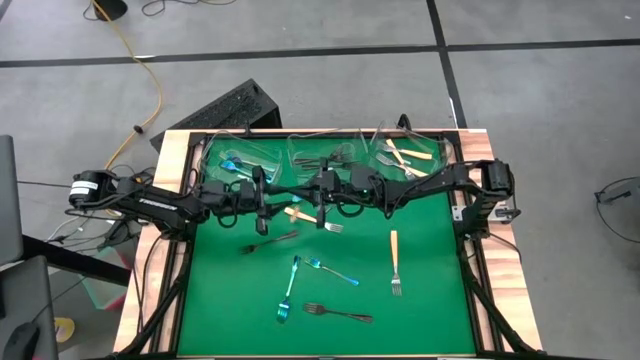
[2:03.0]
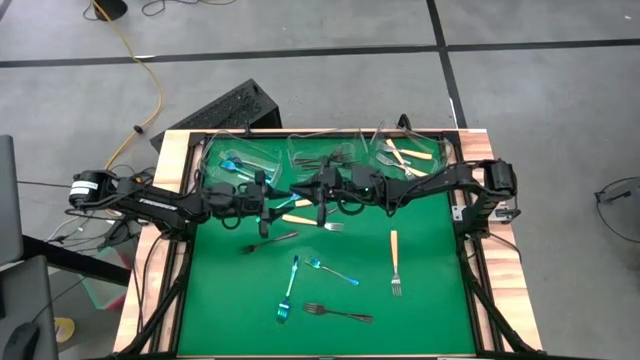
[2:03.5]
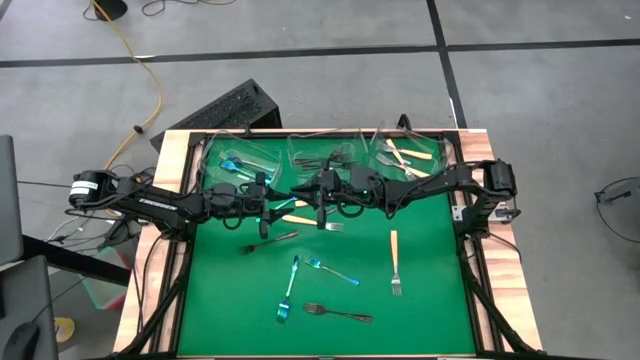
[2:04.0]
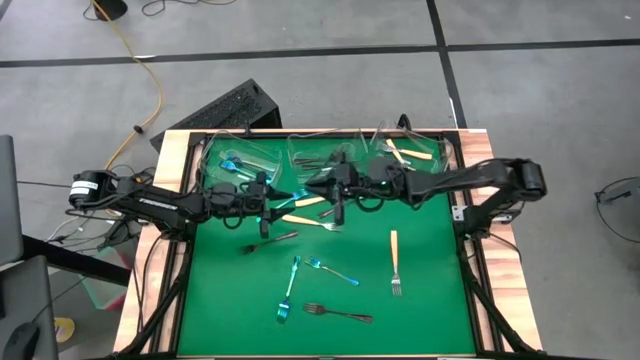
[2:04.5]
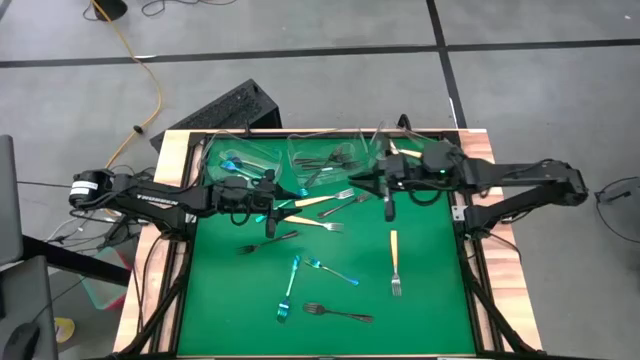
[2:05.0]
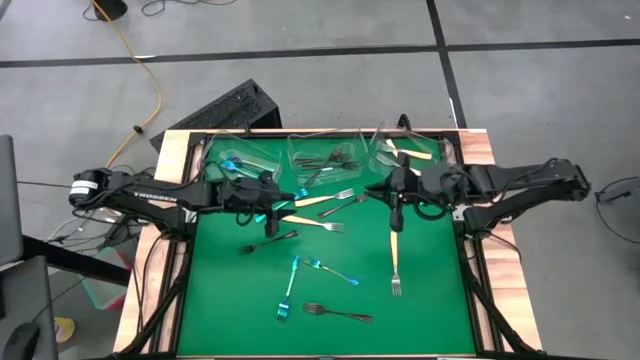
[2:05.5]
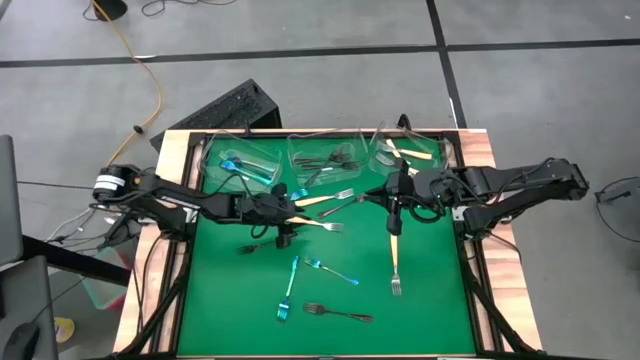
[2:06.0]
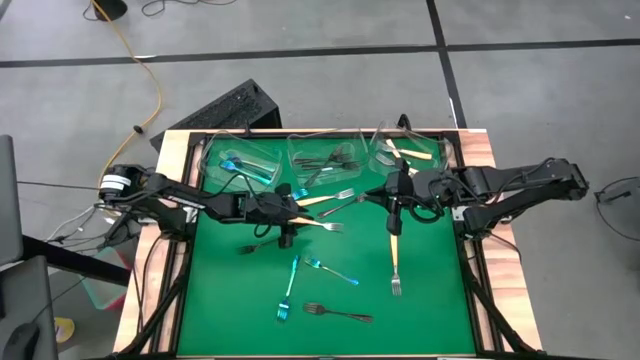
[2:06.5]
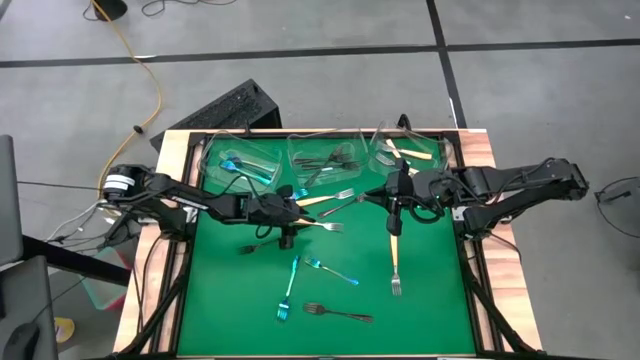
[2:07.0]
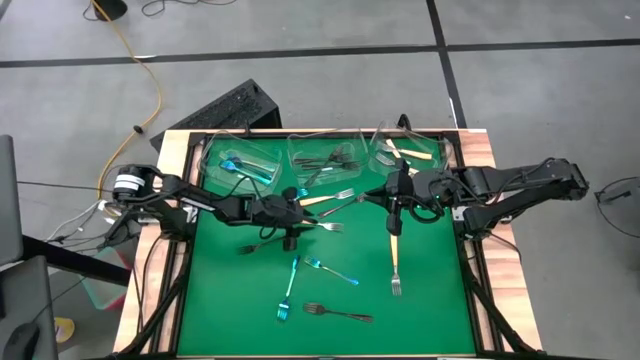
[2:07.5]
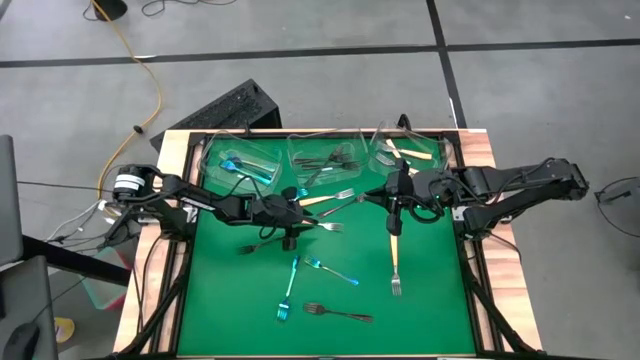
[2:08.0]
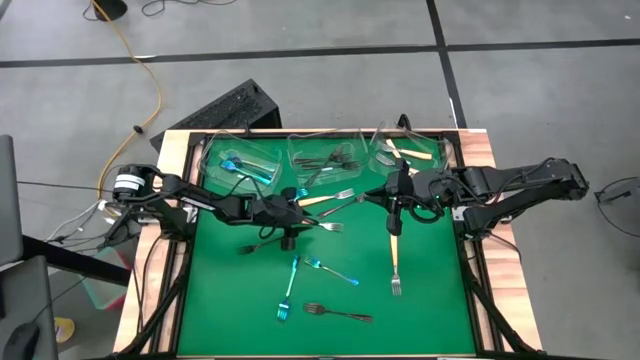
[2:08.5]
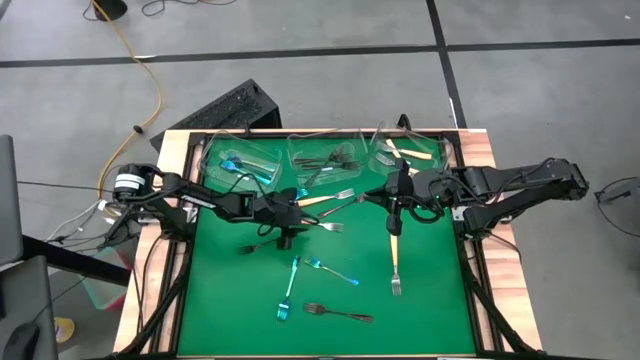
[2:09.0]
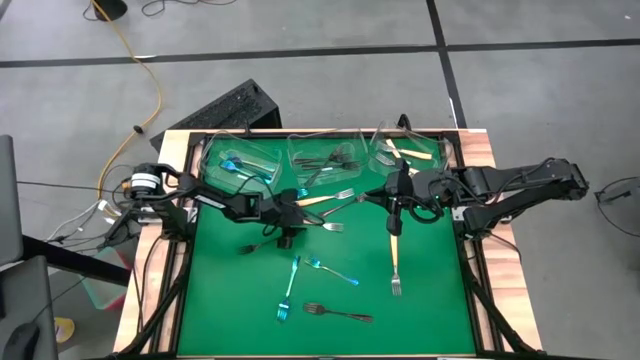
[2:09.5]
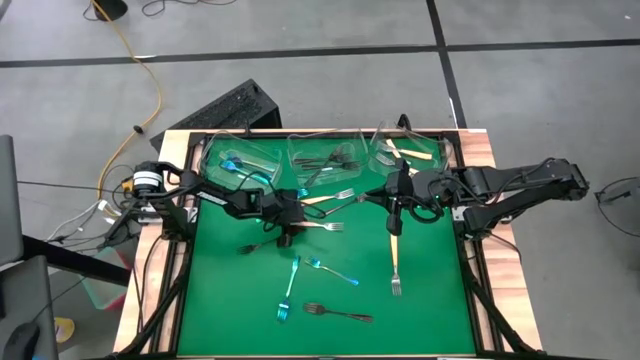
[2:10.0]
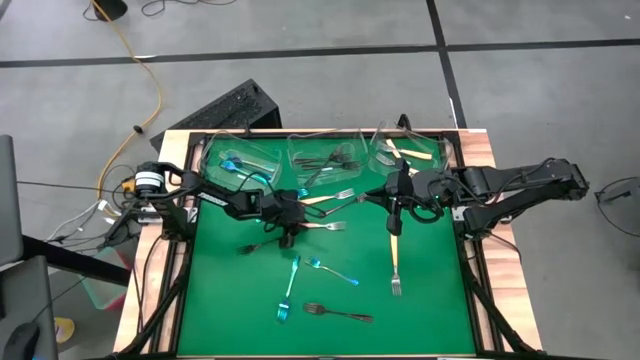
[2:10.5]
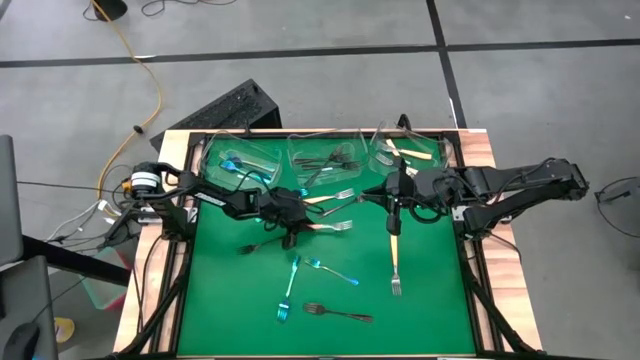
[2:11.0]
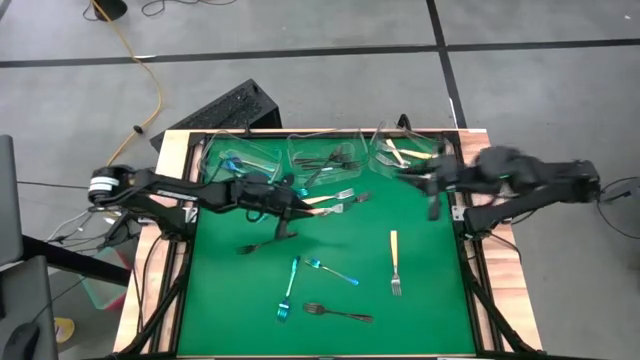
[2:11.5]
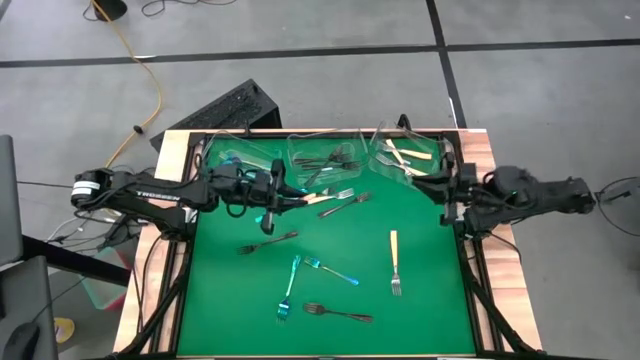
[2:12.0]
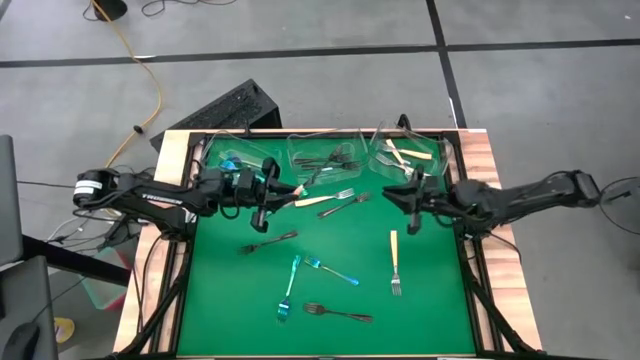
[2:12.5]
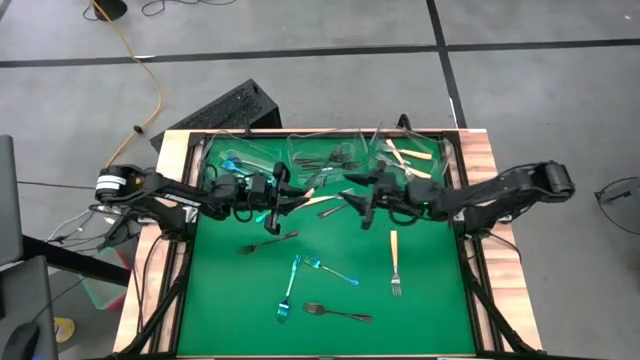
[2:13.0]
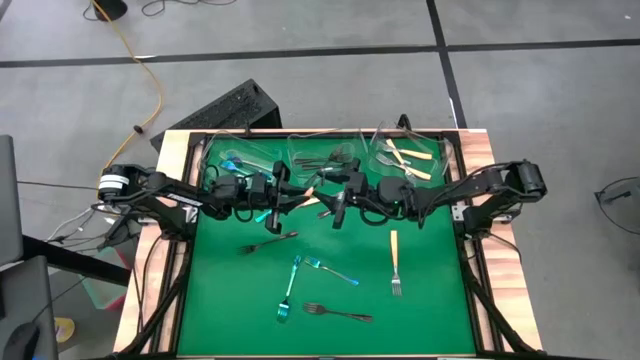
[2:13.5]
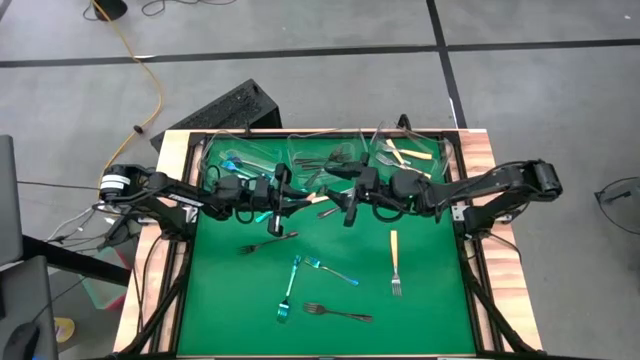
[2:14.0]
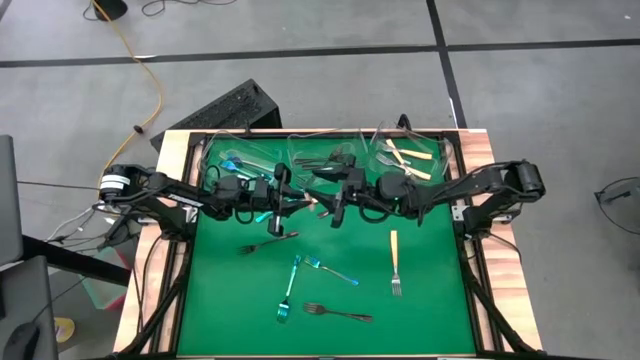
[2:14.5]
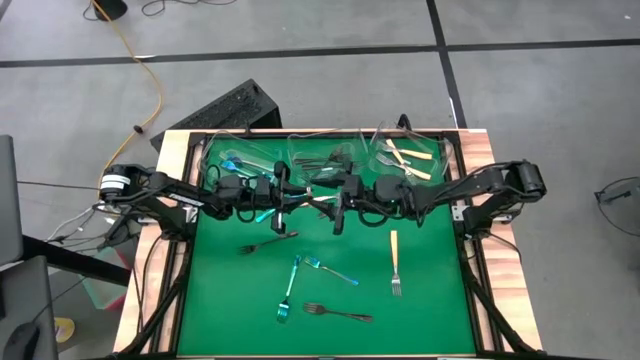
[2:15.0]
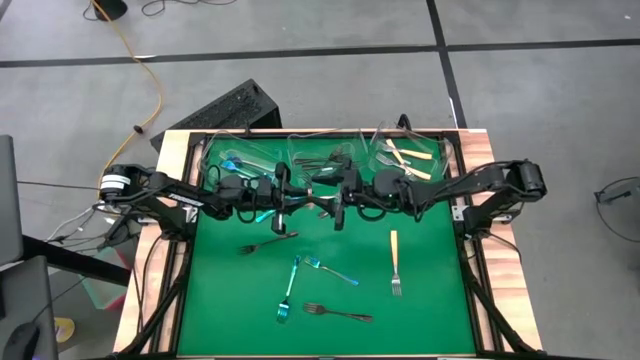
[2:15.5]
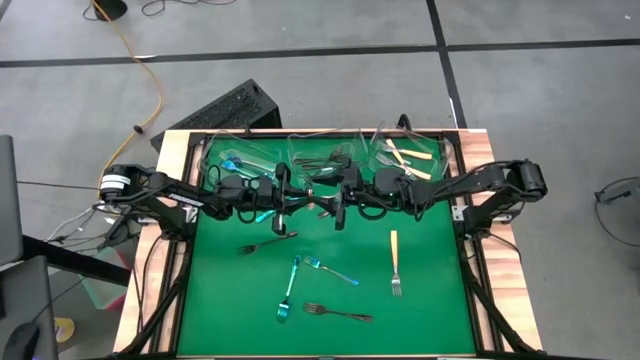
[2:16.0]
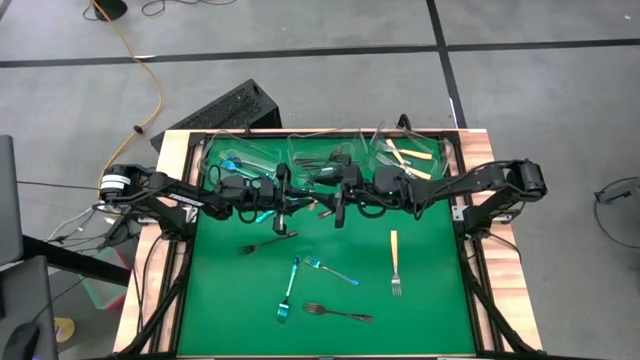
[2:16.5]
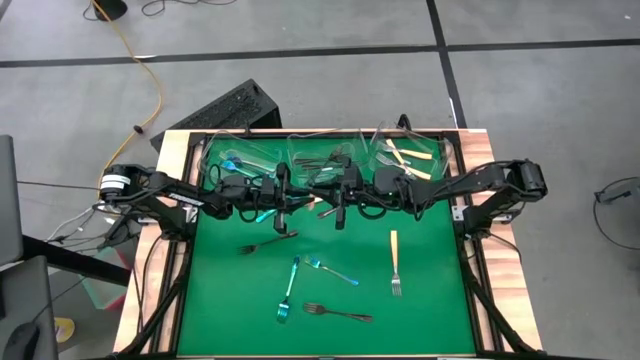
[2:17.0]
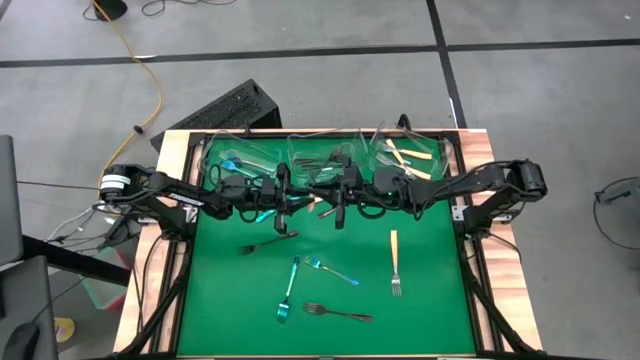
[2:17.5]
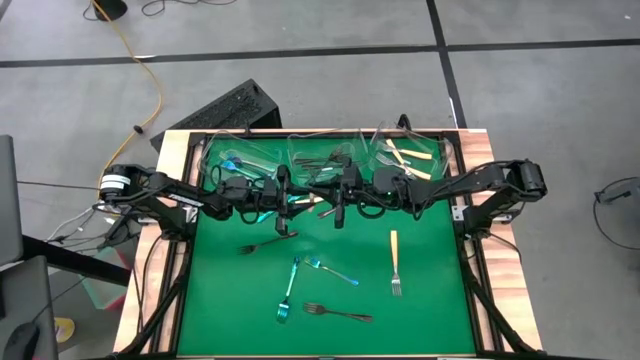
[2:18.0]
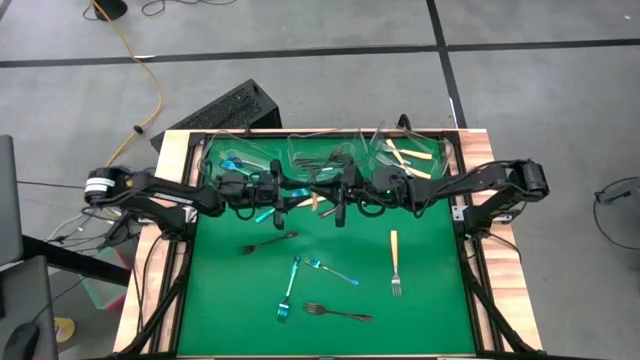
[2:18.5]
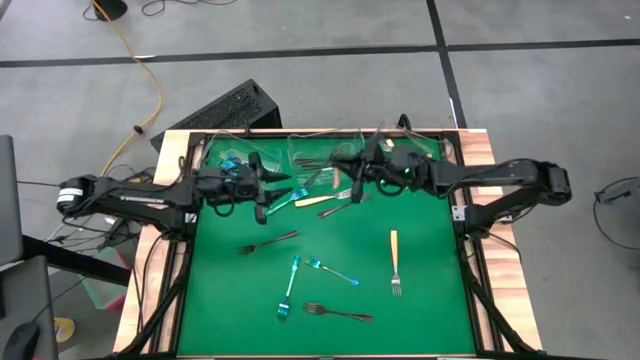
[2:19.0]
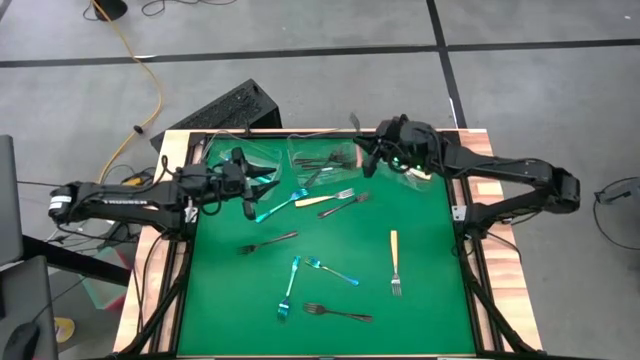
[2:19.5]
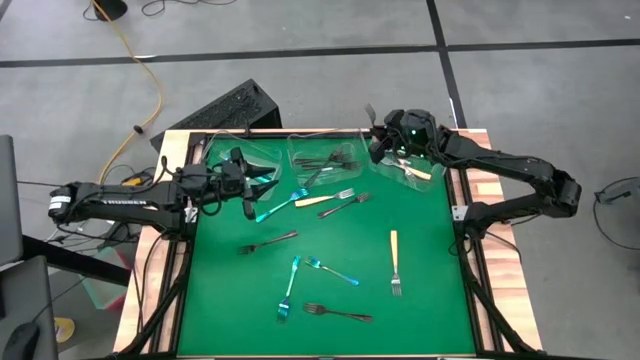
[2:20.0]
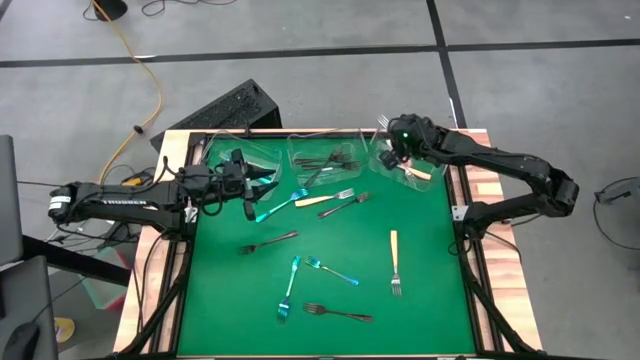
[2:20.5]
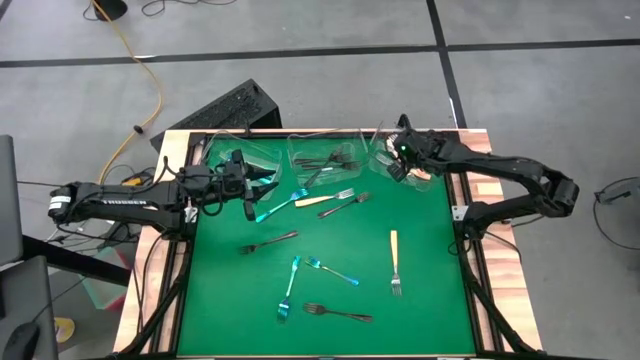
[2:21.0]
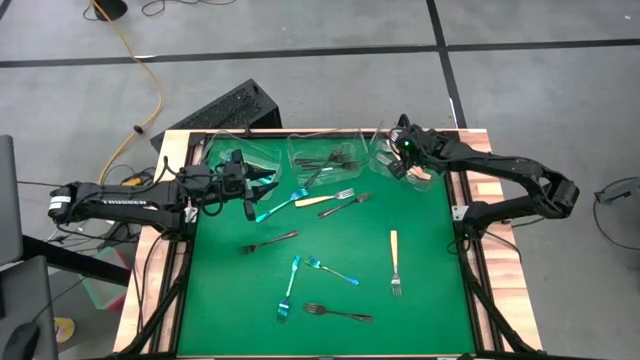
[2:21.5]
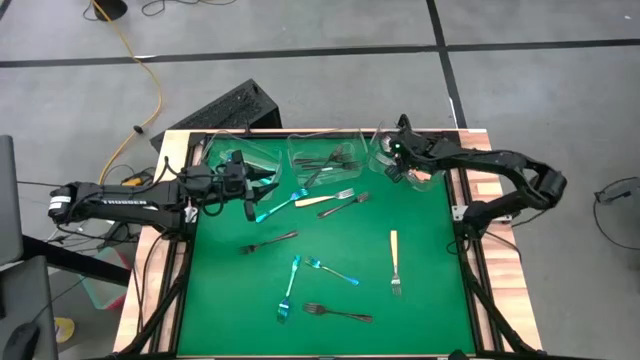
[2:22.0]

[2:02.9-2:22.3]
Task: Sort silverware by color (type)
Put the yellow fork into the right transparent bin

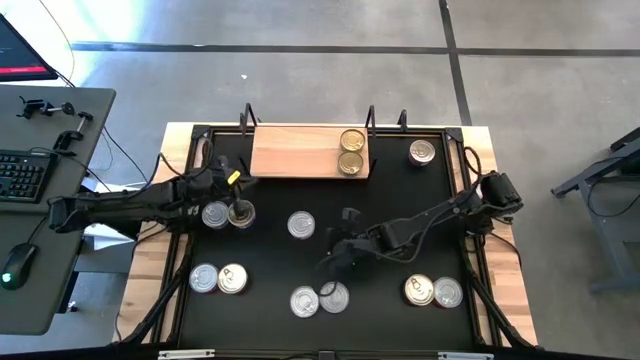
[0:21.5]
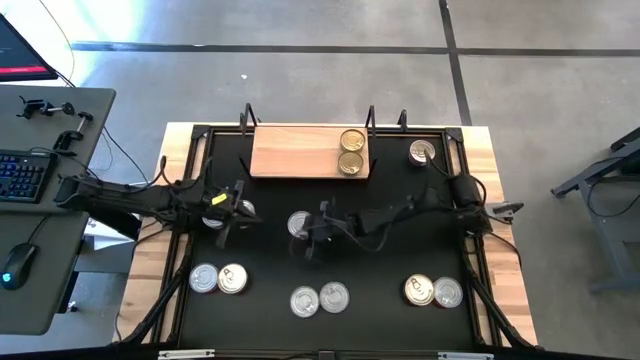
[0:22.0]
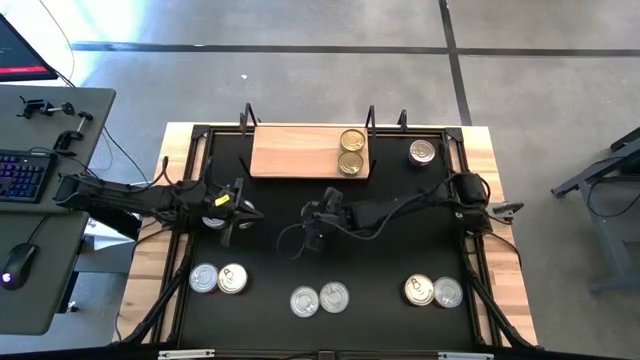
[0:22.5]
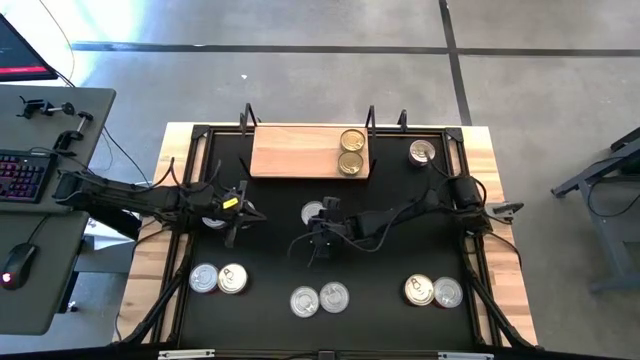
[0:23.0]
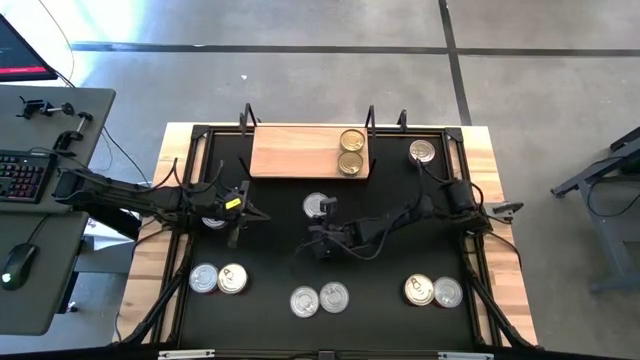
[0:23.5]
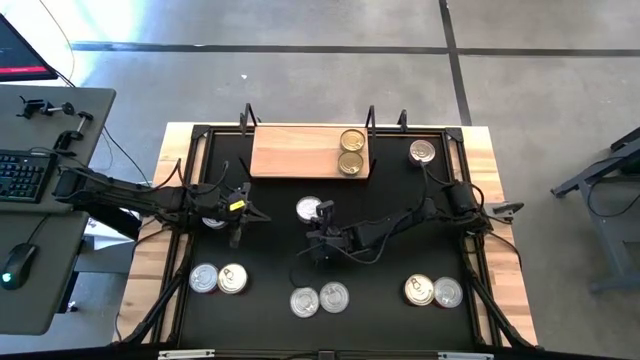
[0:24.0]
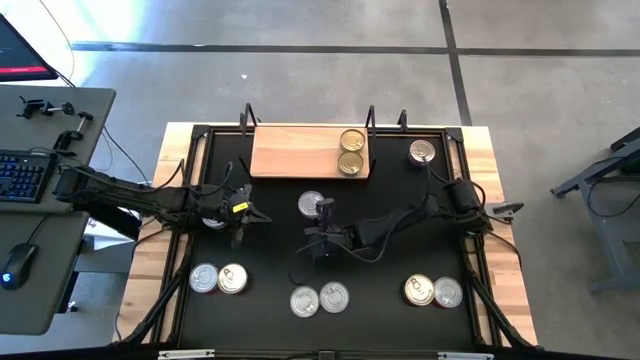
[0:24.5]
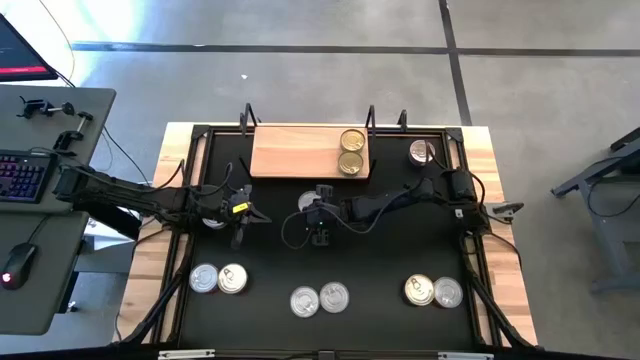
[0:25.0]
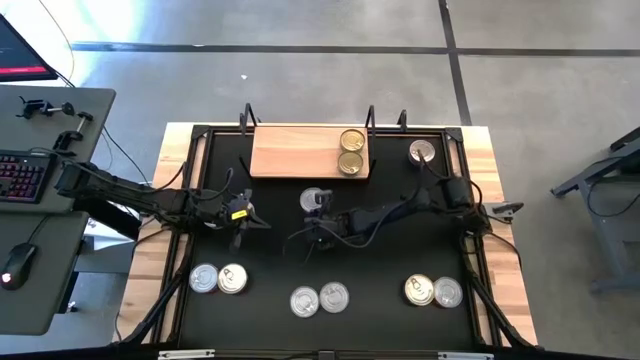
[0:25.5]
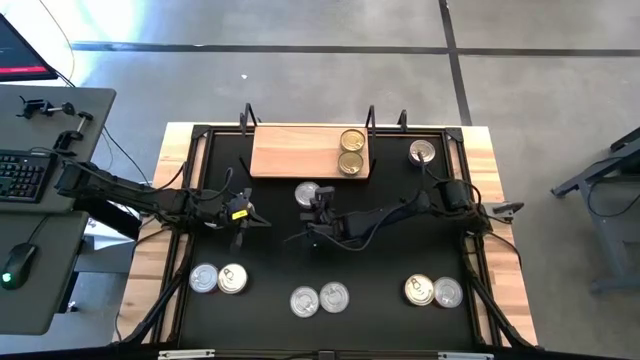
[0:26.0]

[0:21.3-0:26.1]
Task: Stack canned seafood by type on shelf
Put the red tuna can on the shelf
